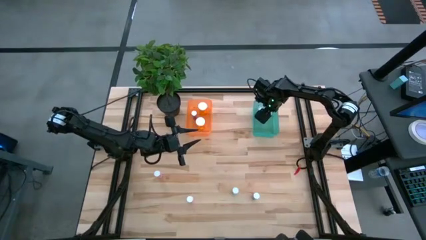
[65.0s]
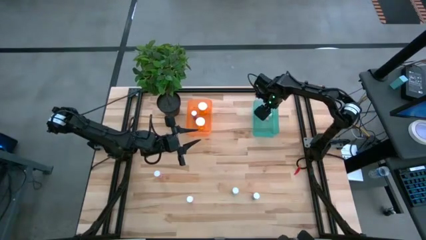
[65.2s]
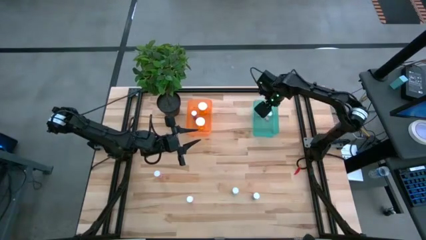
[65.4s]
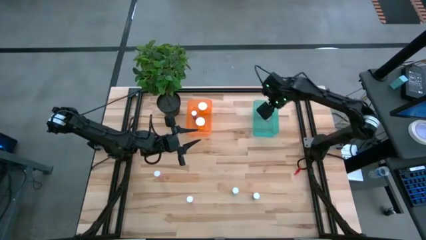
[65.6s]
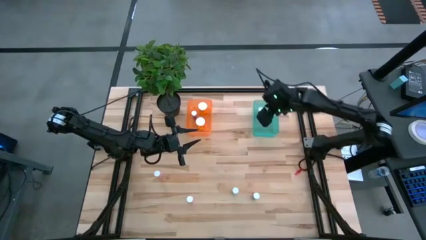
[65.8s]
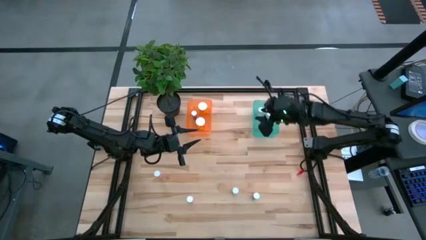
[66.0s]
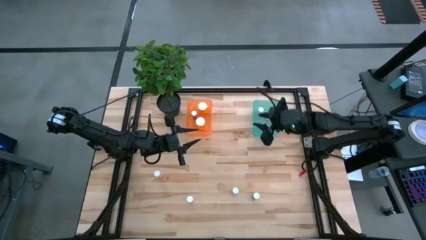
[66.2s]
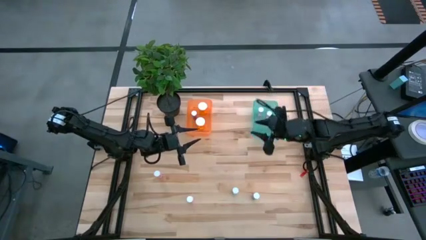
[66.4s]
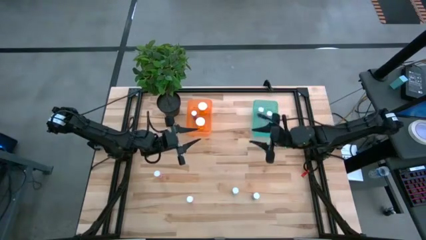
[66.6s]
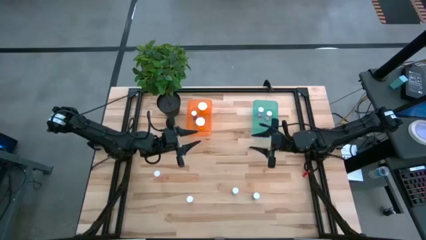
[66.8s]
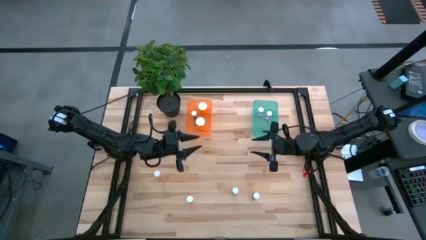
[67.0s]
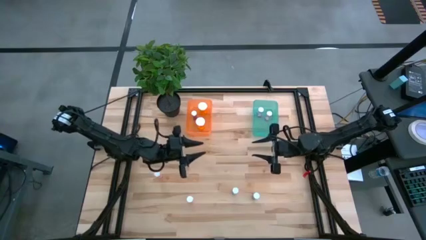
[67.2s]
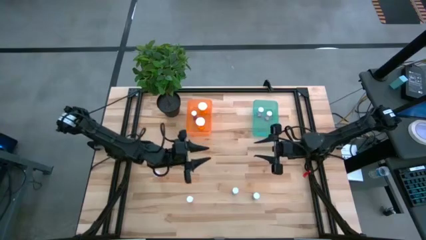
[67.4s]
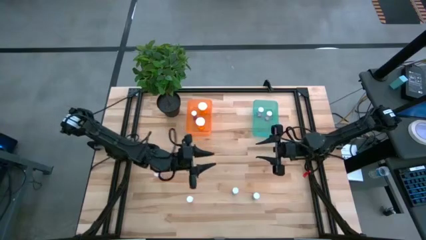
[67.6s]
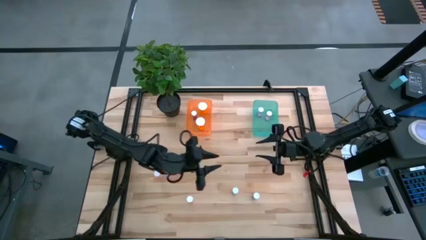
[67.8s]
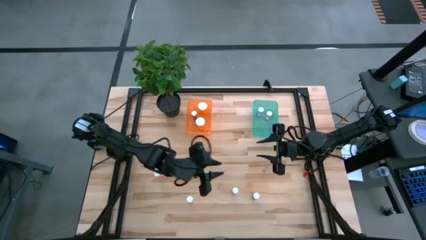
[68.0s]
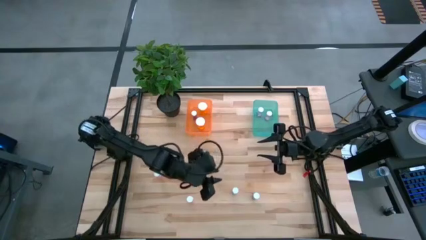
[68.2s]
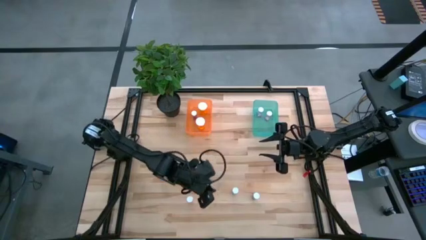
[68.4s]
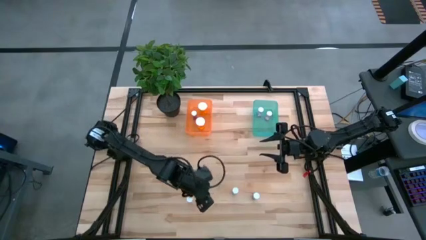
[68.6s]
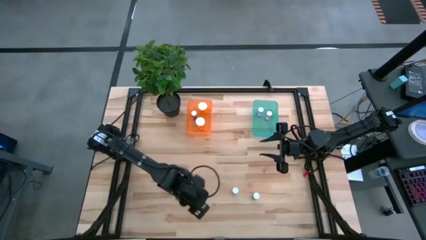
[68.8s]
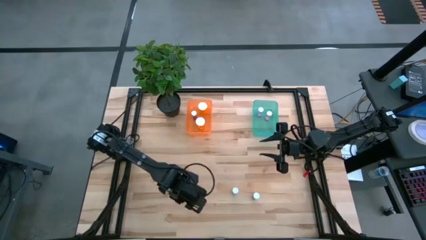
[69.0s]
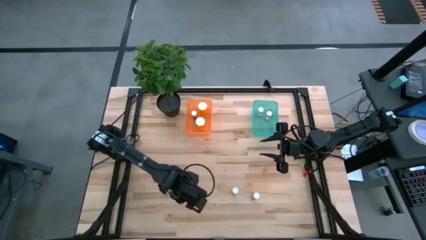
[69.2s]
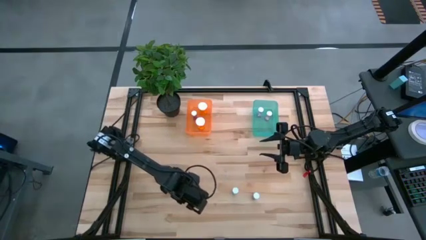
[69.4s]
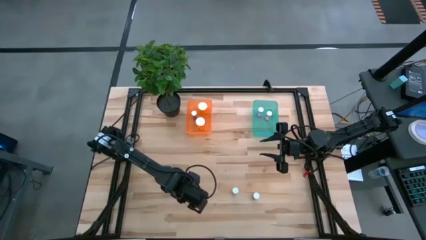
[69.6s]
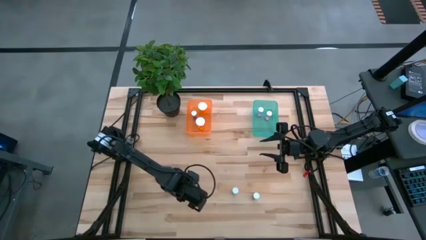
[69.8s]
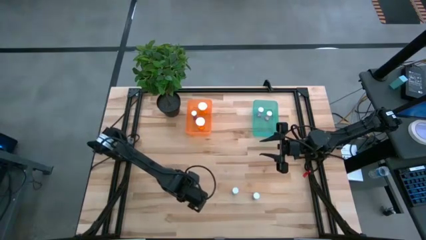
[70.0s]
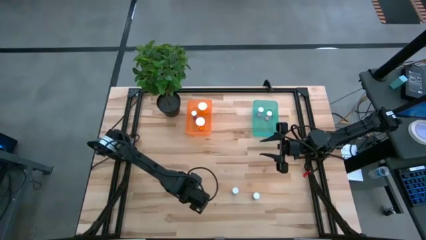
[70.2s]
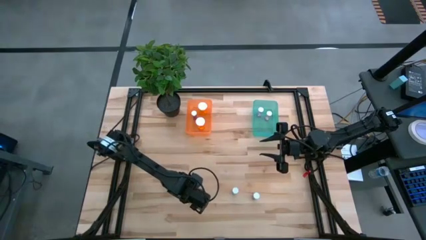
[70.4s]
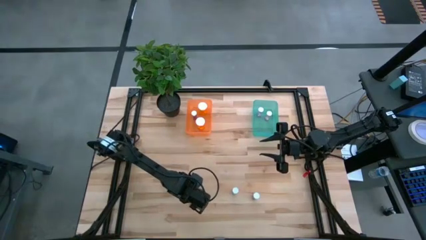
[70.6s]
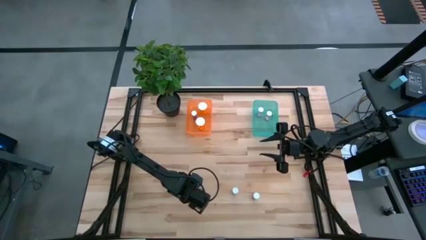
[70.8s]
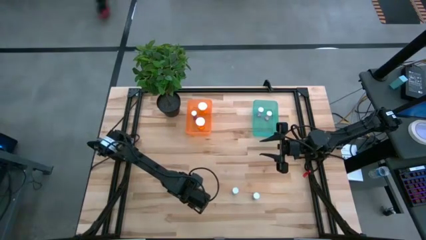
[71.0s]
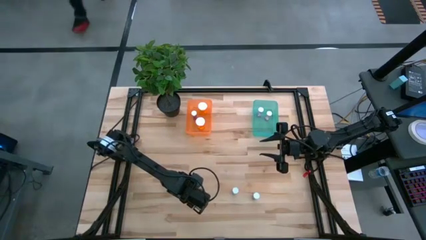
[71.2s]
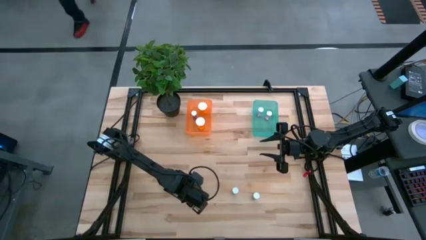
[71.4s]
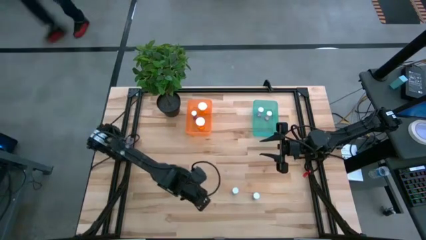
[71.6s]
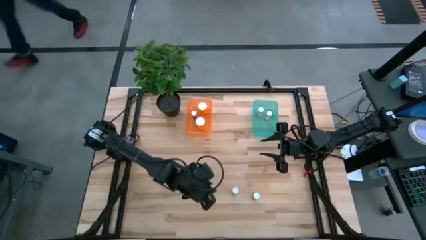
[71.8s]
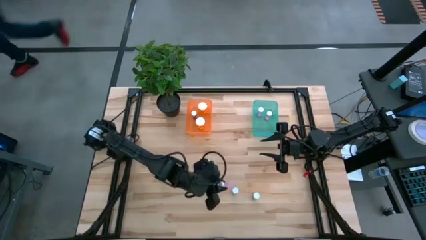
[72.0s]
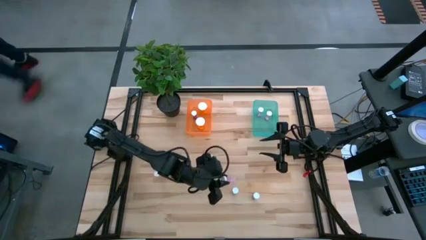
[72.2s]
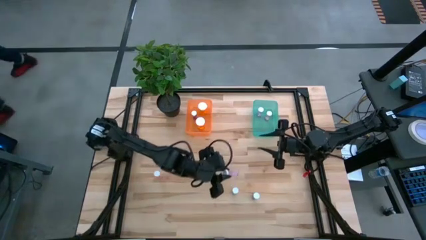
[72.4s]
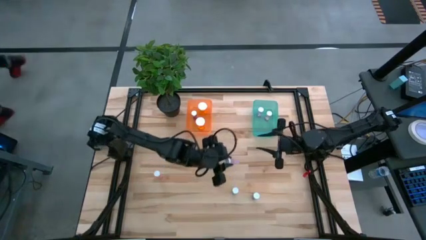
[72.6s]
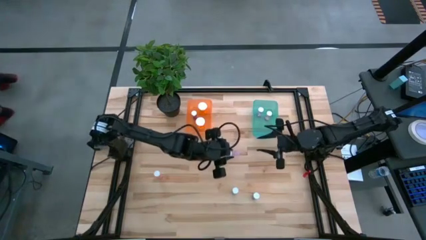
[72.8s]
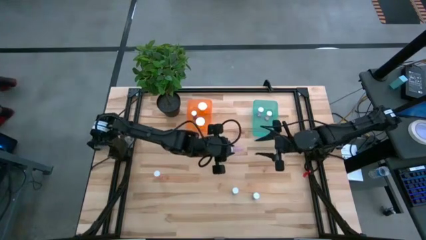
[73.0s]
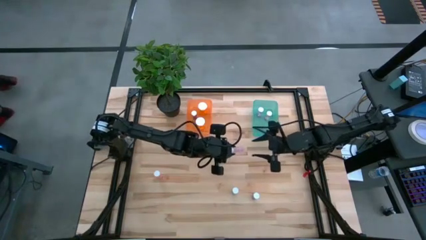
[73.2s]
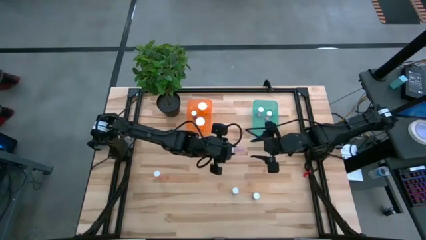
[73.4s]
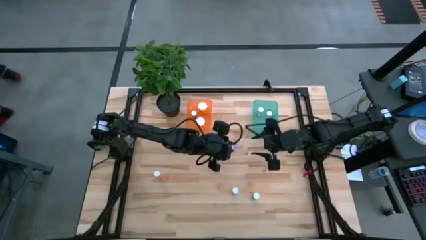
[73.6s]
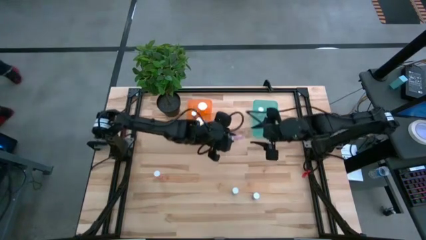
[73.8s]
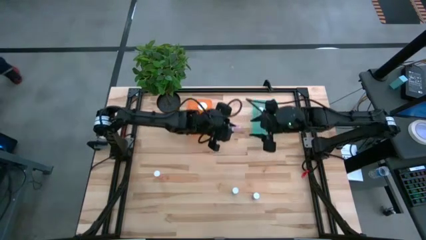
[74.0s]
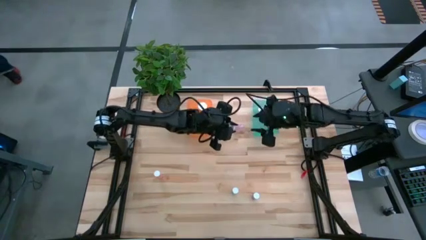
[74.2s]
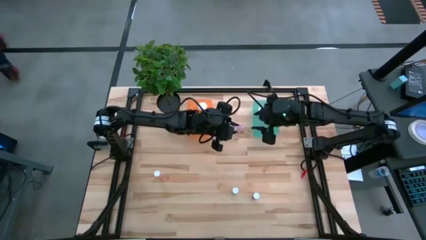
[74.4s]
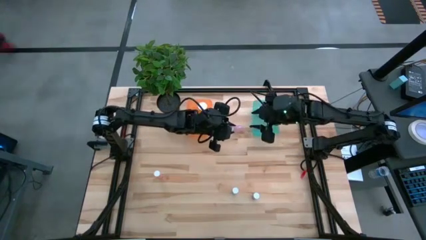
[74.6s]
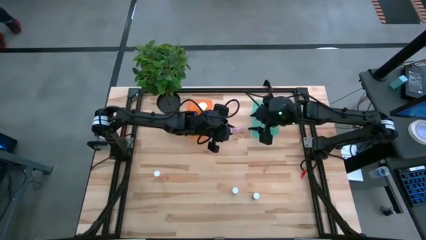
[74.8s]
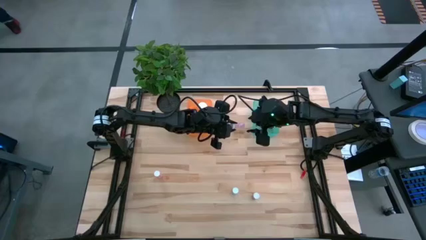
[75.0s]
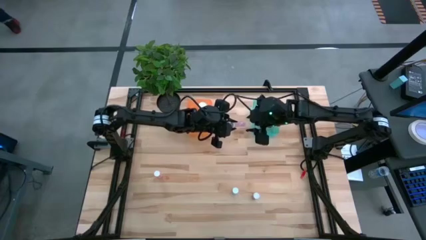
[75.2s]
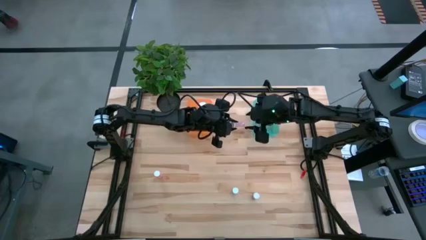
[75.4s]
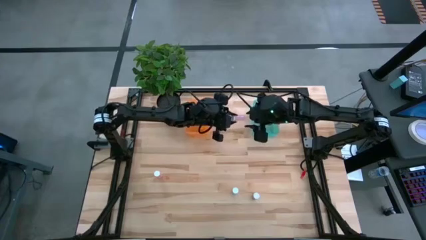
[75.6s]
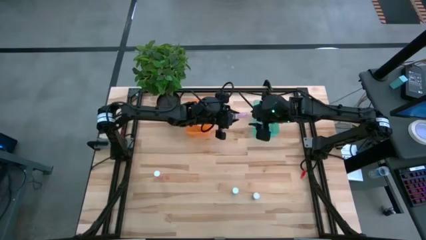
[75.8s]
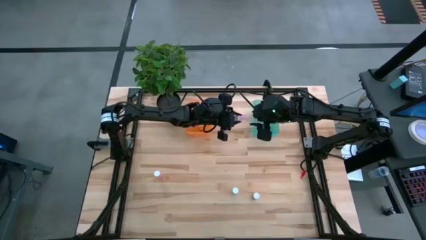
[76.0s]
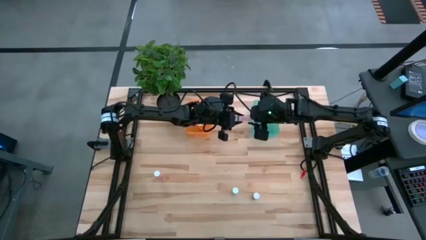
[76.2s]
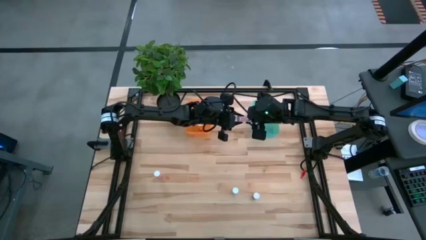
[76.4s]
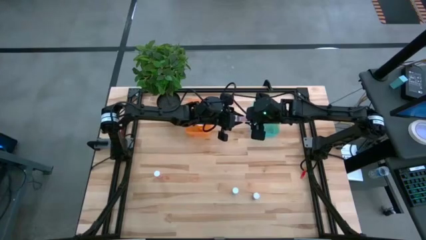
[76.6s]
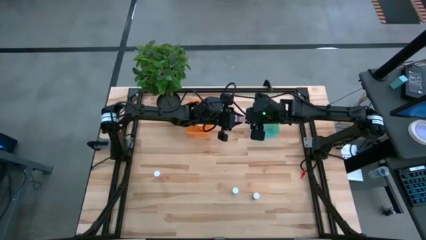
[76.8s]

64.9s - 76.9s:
Task: Pick and place medicine bottles into bin by pill shape (circle, oval)
Put the bottom pink tablet bottle into the green bin

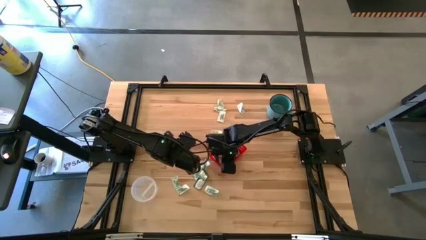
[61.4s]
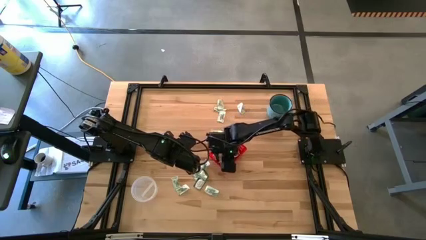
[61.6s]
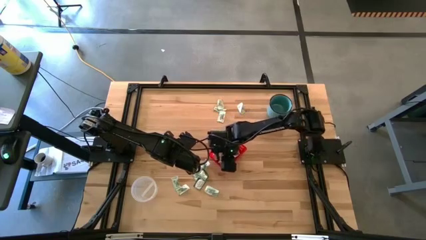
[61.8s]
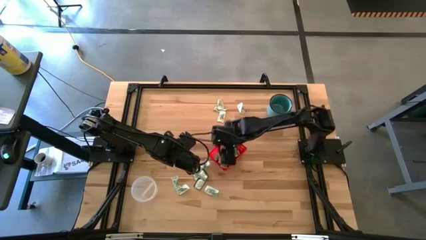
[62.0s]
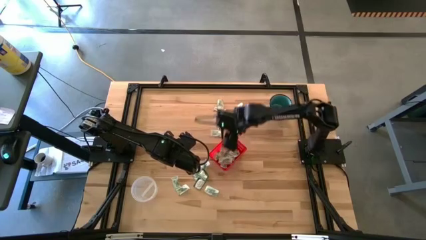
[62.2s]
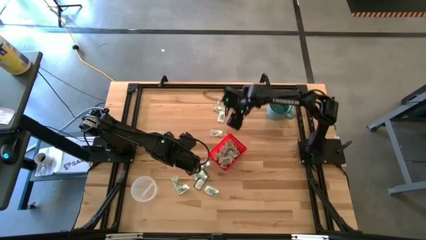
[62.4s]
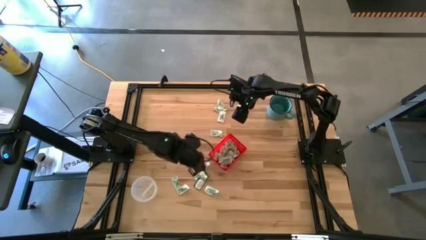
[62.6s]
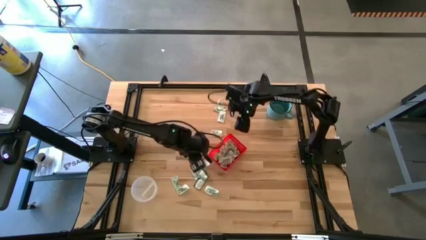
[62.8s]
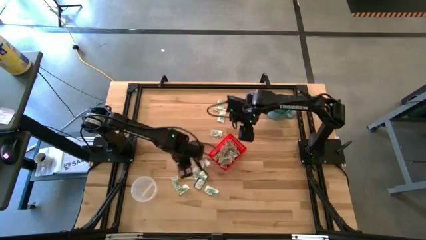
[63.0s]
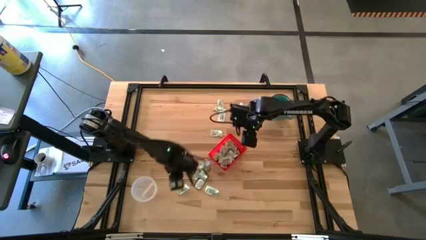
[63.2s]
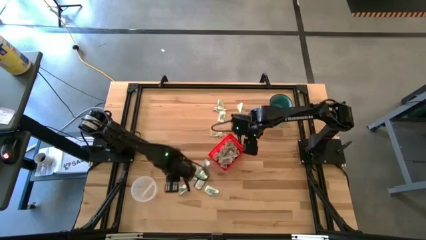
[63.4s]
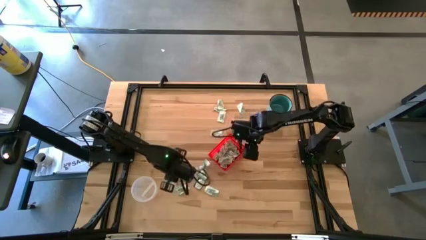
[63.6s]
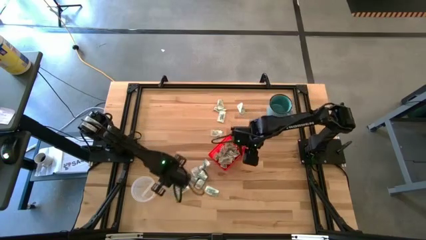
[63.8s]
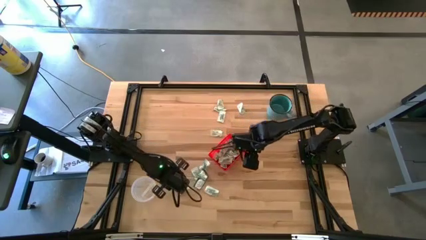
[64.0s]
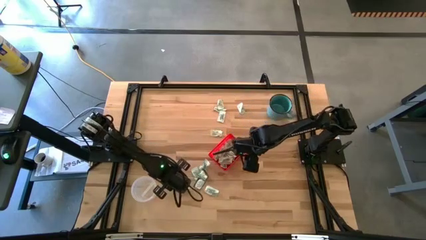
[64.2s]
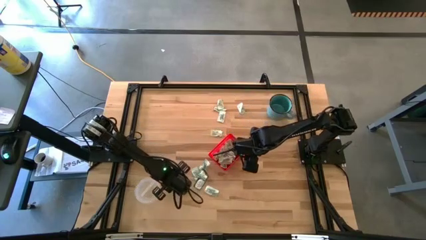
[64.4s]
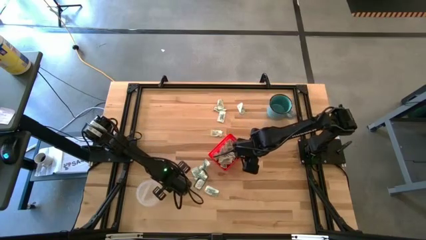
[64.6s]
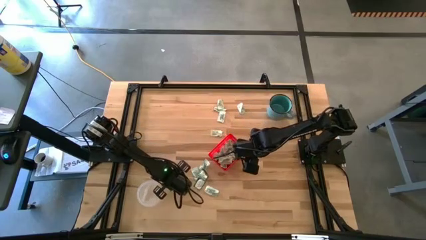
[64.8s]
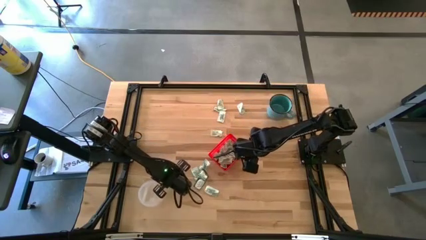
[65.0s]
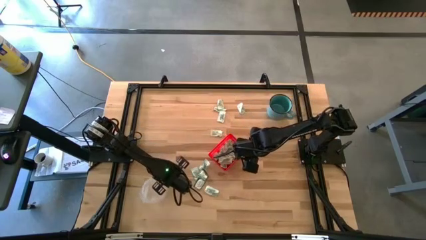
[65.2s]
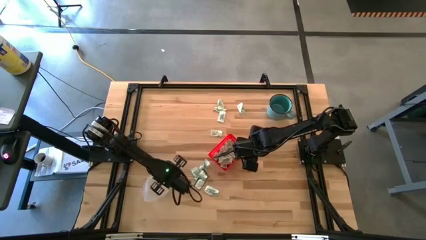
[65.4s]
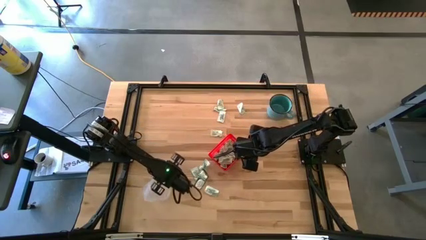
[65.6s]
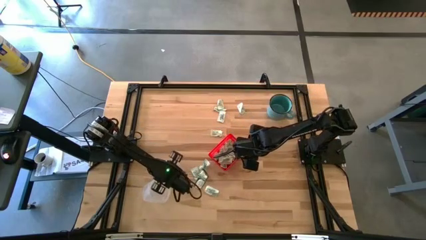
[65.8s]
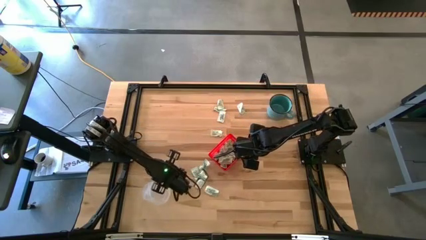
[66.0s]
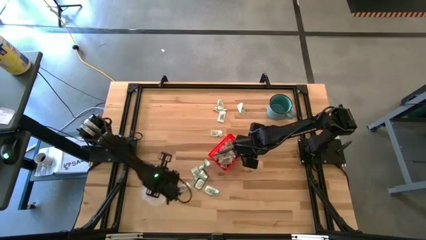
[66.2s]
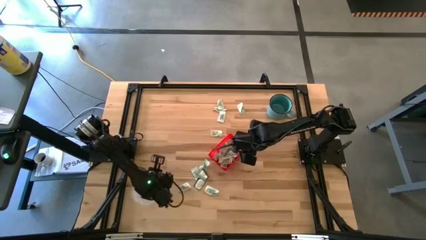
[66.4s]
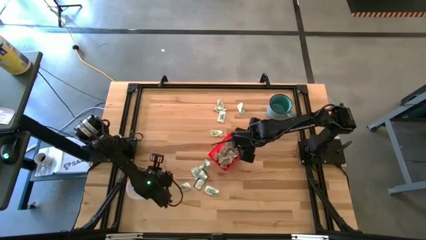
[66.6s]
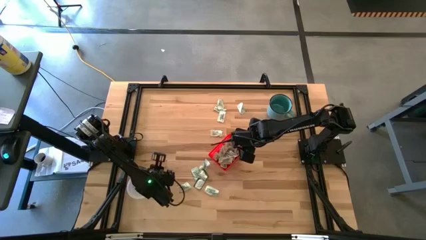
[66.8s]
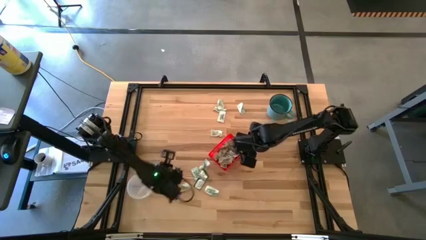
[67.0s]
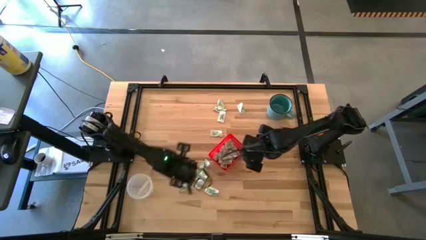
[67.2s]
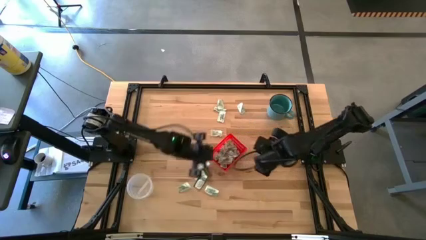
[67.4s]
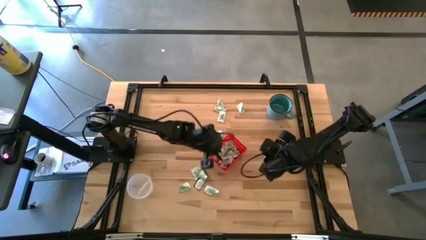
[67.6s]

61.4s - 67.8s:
Task: Pick and place items into bin
Put the white stevia pack into the red bin
